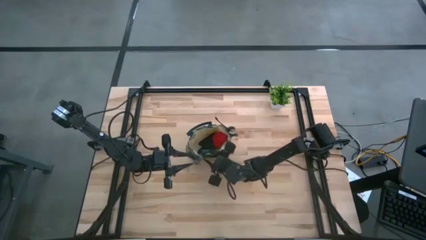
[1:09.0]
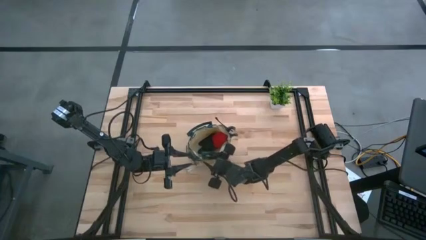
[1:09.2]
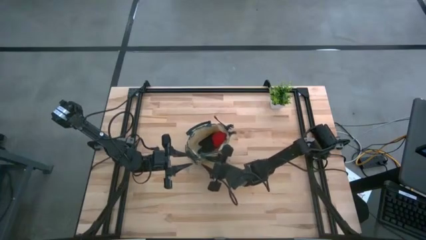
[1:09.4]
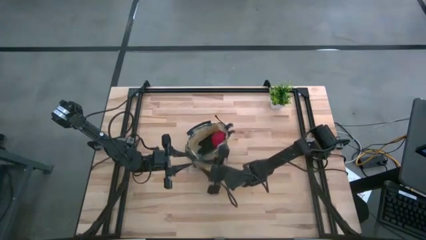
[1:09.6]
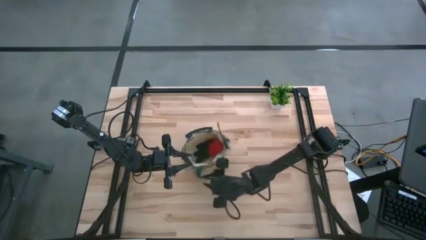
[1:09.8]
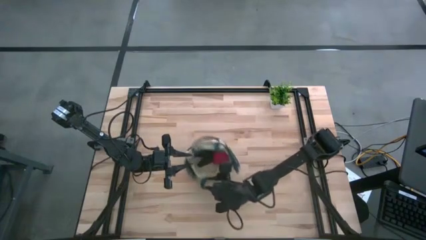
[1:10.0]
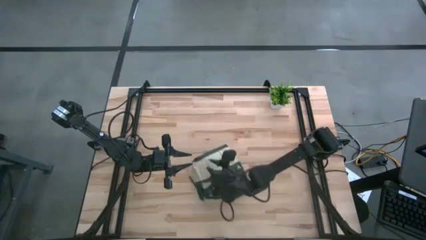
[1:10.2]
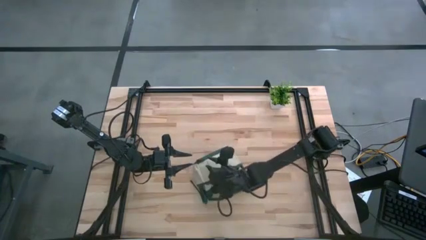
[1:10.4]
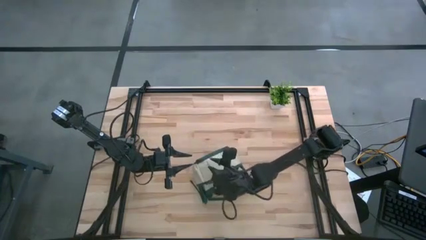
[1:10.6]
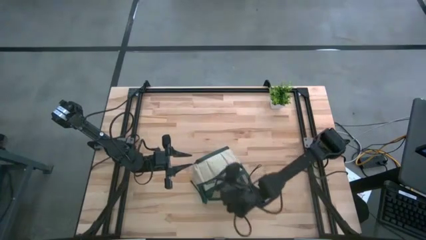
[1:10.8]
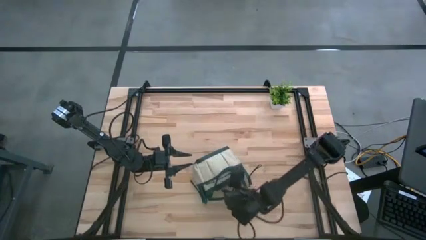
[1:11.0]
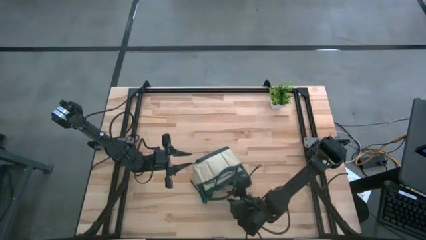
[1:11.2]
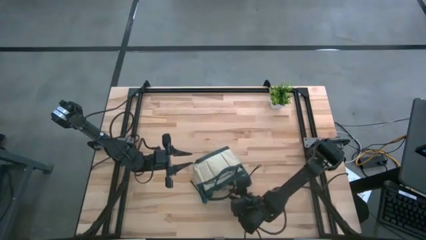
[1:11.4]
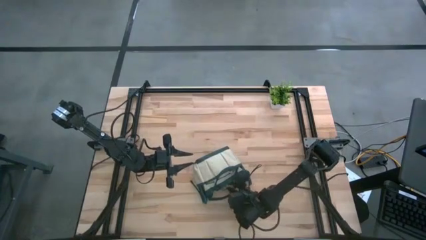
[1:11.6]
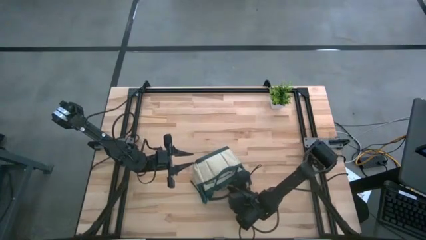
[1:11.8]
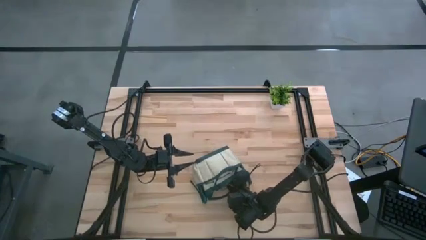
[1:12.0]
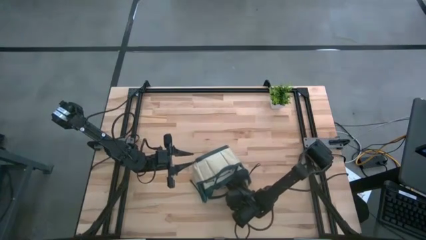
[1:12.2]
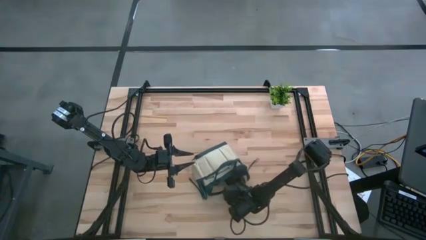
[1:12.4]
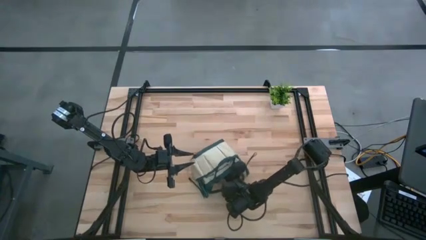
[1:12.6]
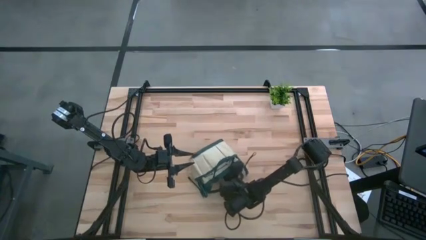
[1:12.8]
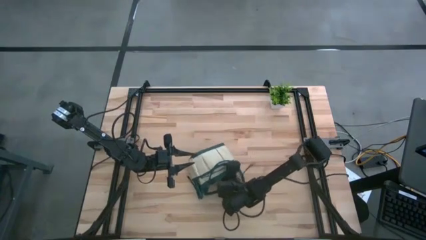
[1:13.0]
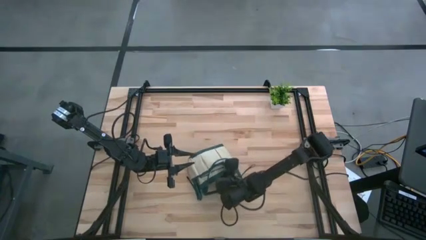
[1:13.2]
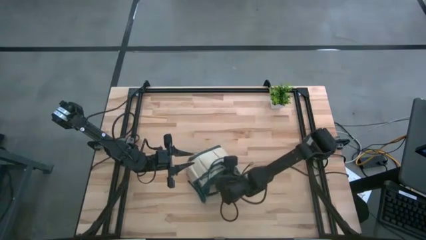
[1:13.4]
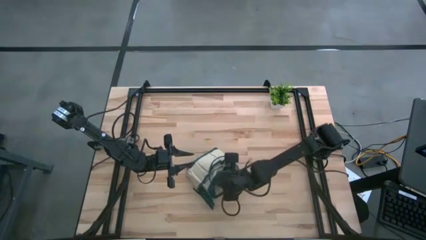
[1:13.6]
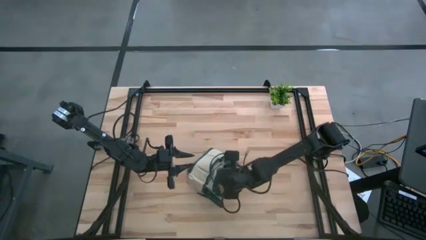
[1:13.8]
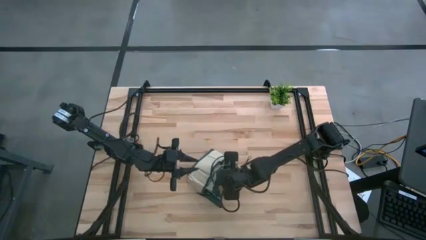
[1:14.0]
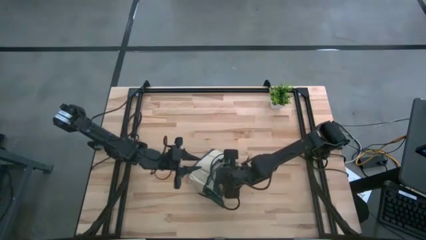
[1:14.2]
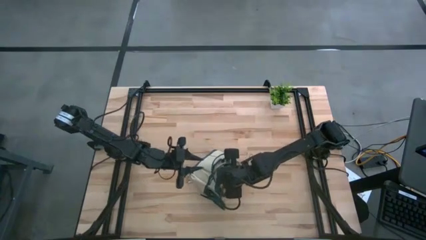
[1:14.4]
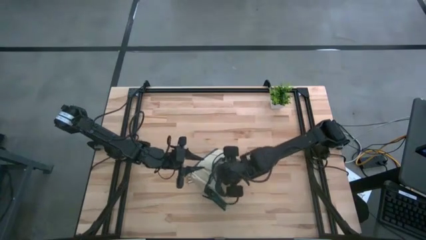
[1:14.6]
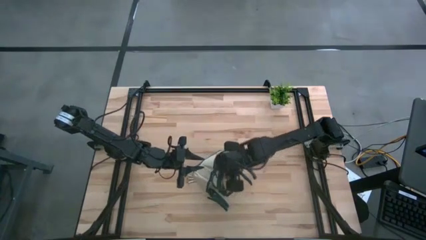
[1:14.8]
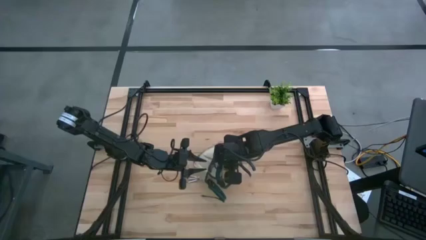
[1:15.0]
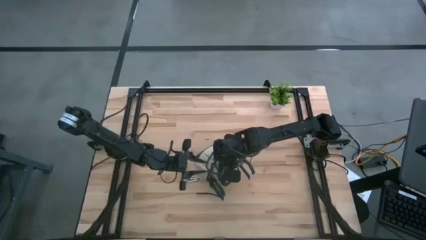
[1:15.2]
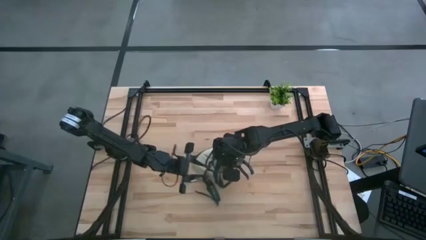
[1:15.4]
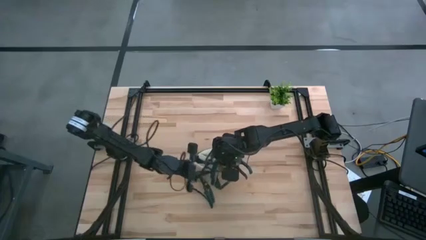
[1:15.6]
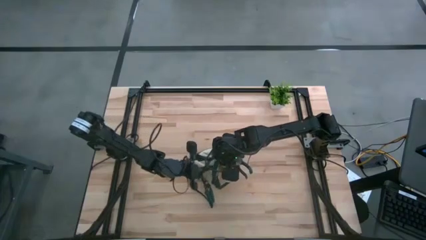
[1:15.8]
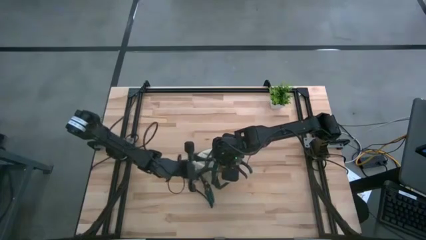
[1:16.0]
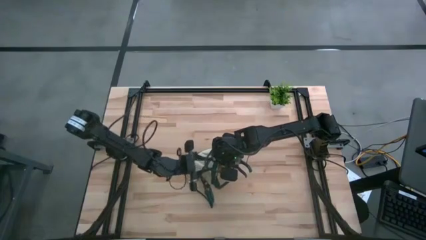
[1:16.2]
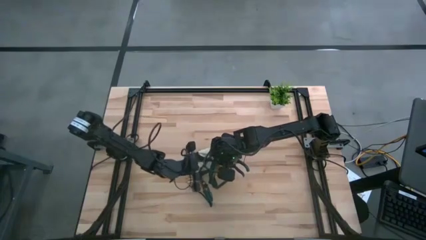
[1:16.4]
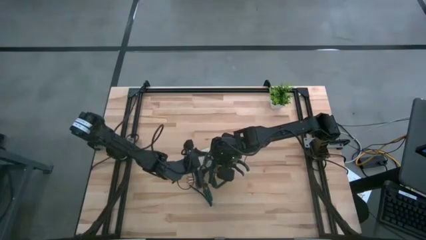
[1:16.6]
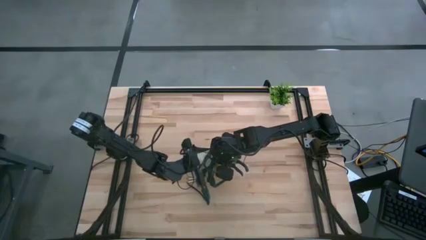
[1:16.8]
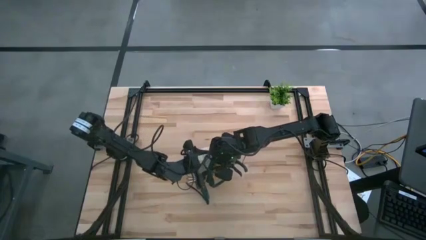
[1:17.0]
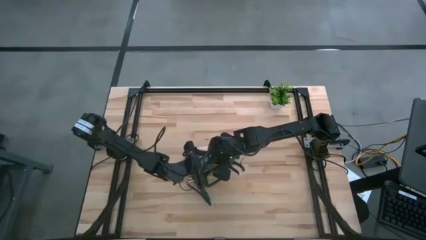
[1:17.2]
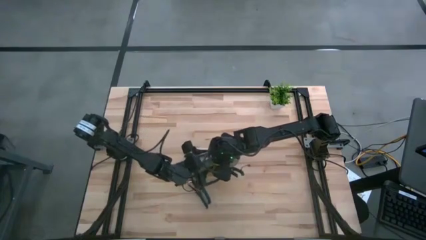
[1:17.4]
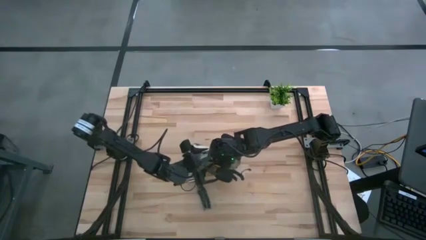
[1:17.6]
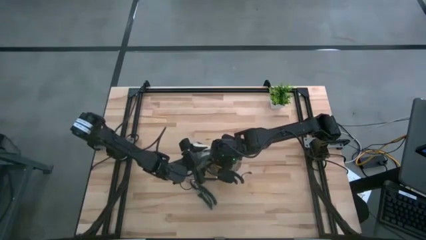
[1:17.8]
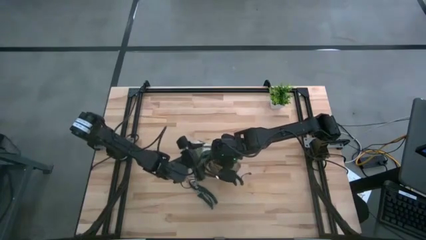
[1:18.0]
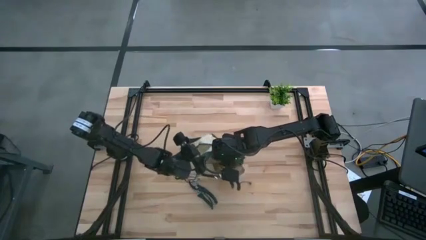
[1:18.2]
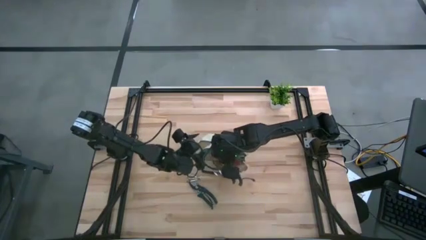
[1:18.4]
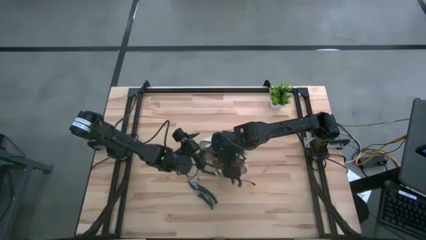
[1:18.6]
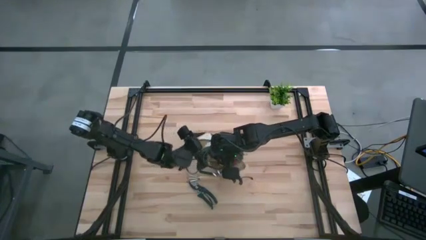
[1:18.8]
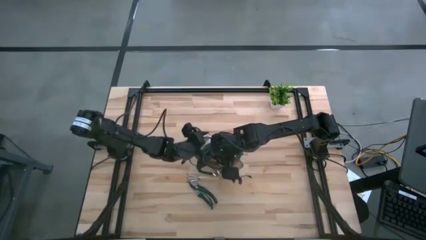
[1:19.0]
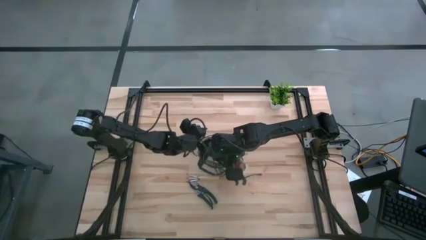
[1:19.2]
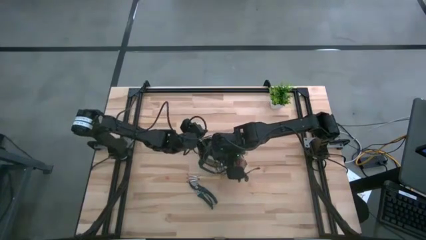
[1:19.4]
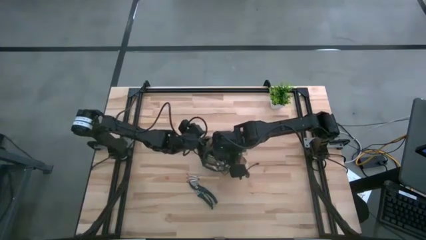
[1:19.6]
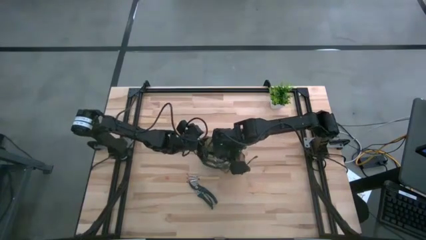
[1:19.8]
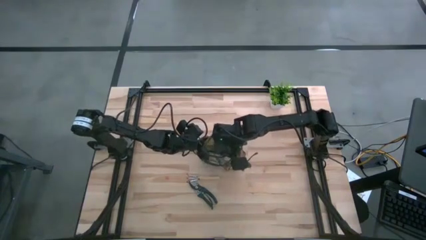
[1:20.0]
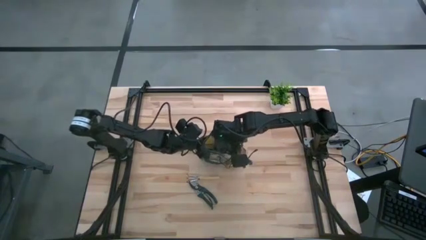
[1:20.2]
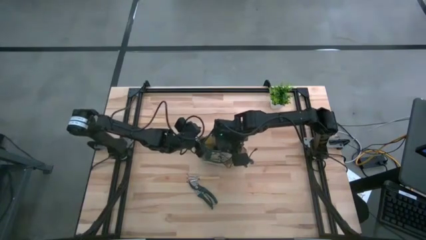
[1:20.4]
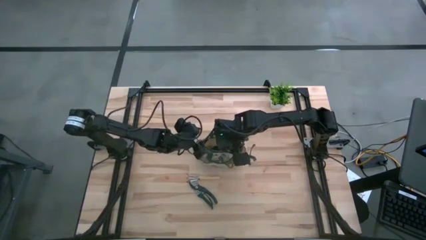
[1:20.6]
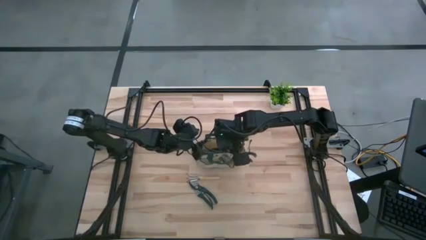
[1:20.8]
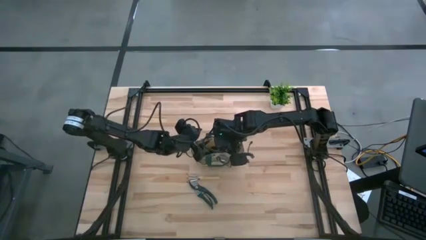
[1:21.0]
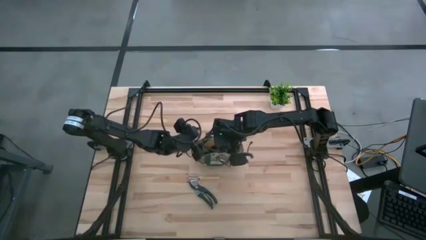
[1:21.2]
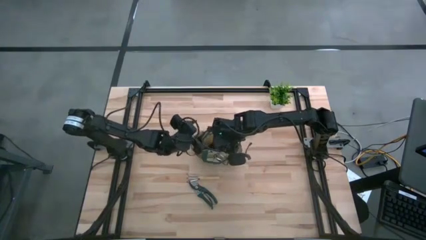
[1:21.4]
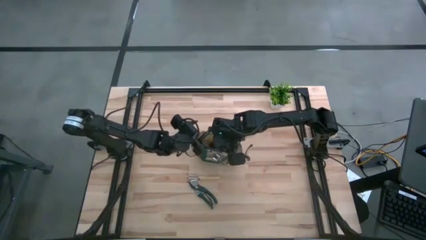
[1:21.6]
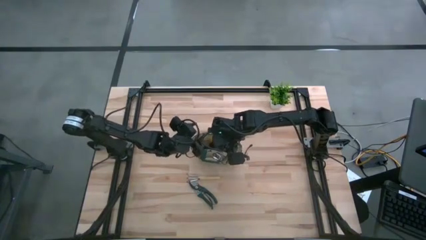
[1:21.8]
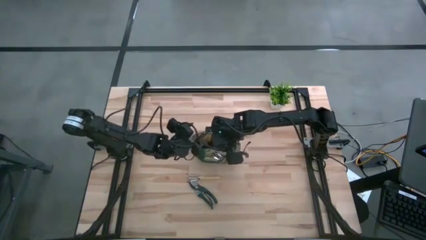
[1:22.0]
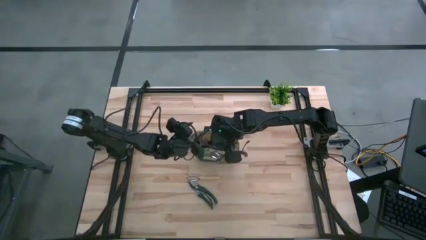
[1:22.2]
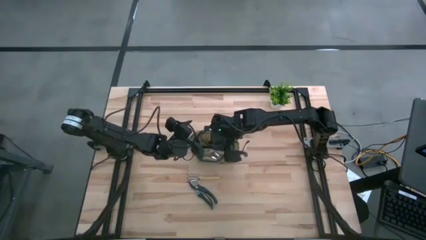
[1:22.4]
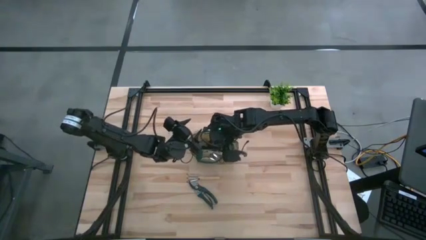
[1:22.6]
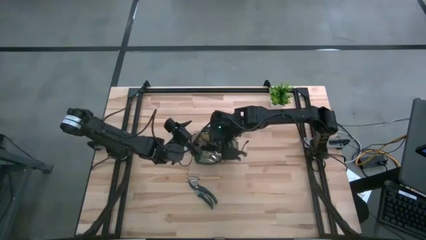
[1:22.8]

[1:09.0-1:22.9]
Task: Pick & Place Garden tools in Gardening bag
Adjust the gardening bag
